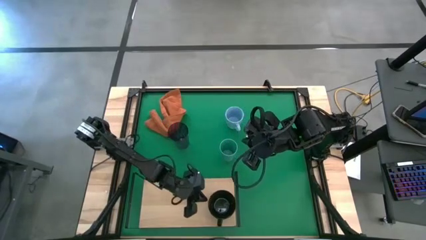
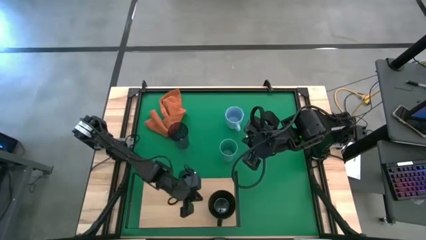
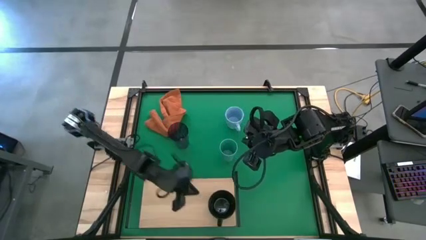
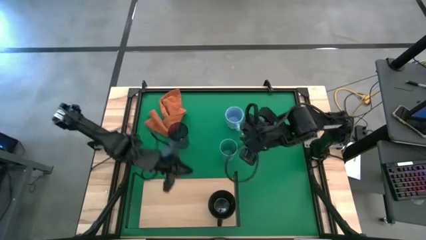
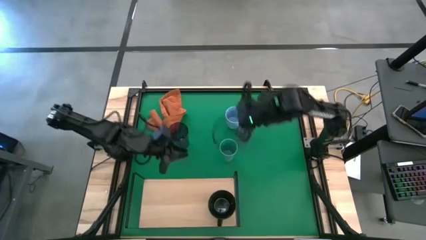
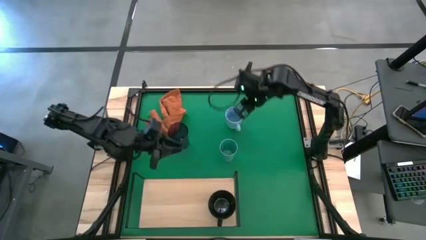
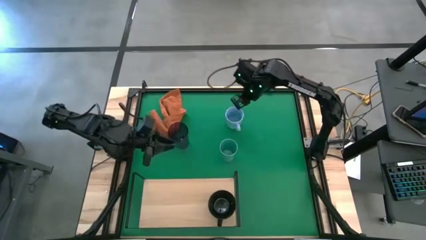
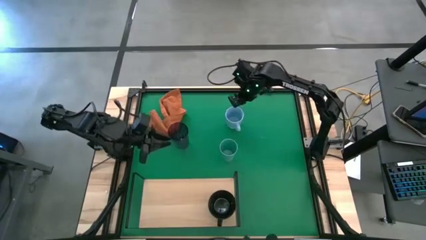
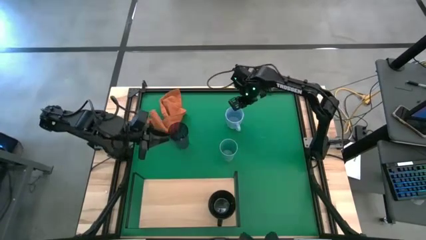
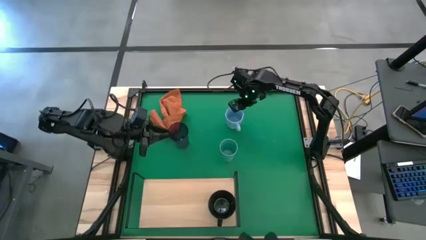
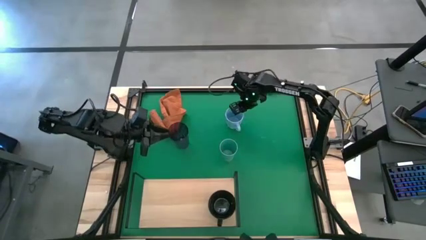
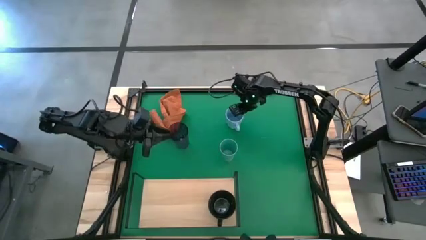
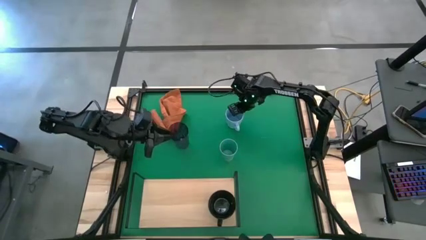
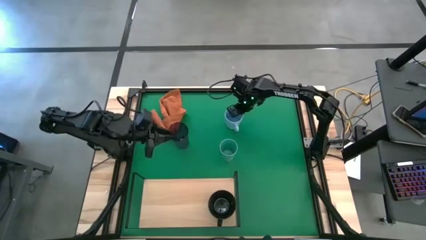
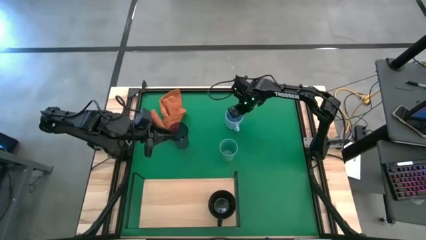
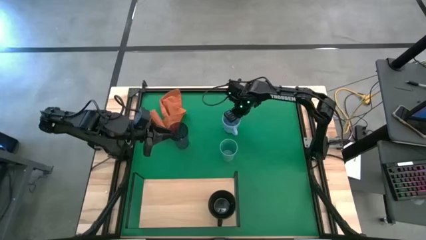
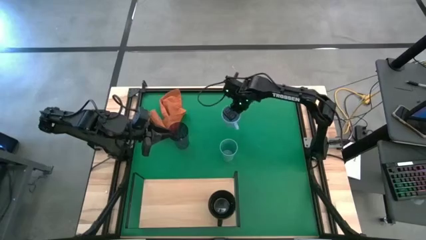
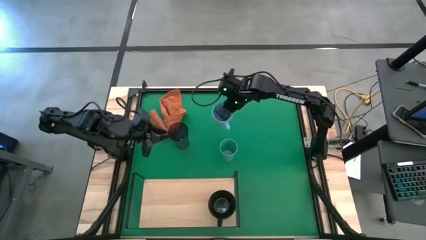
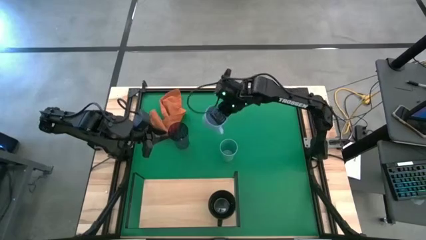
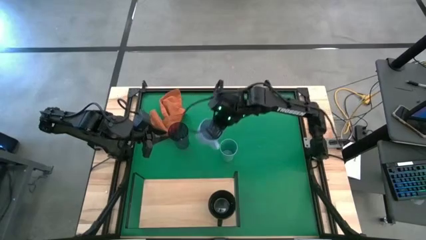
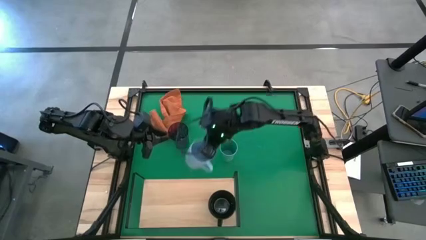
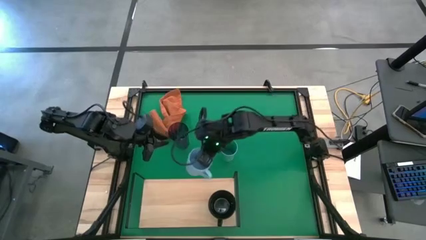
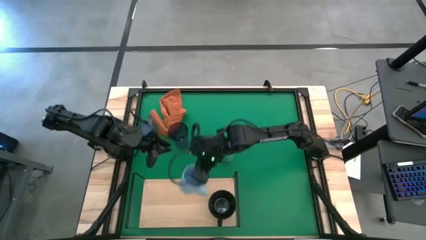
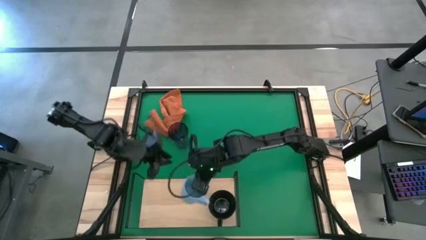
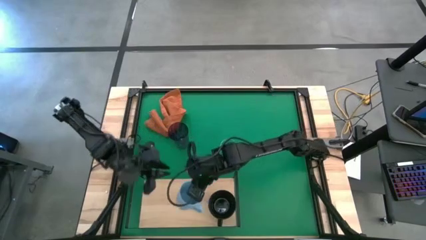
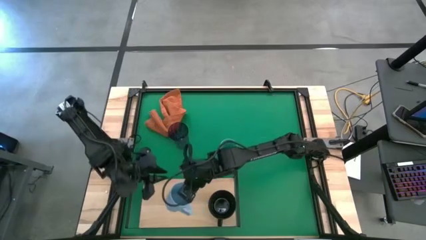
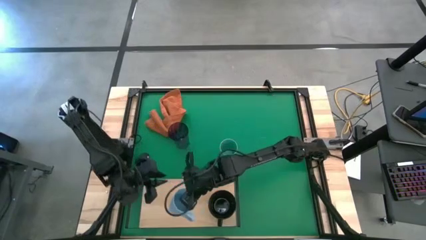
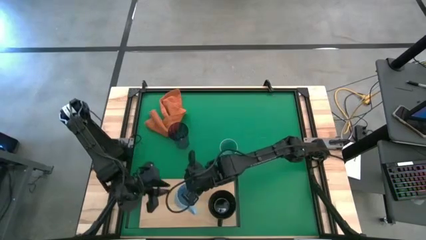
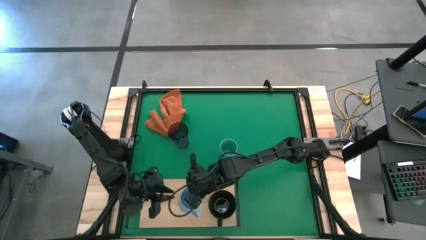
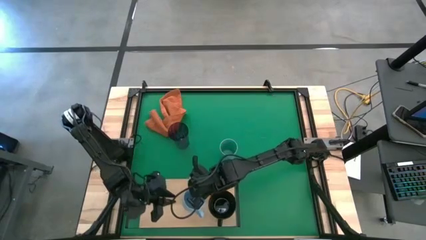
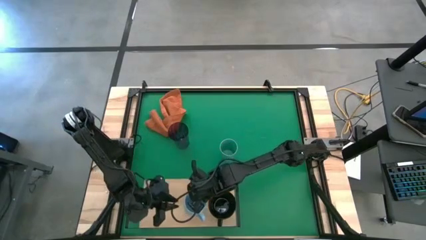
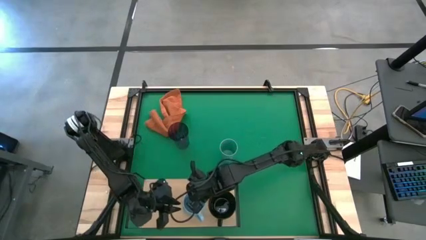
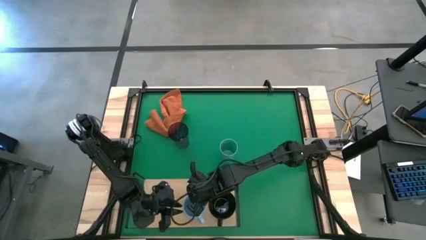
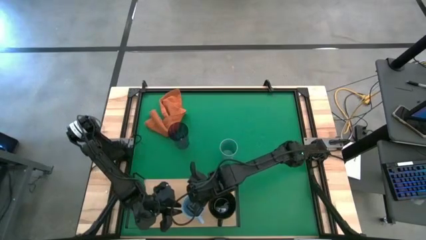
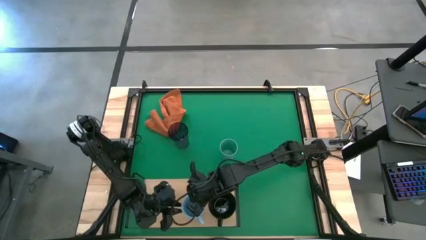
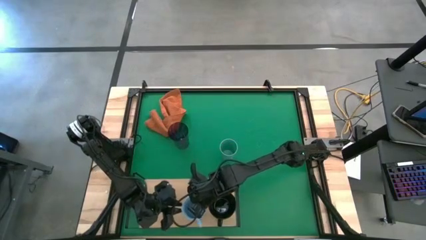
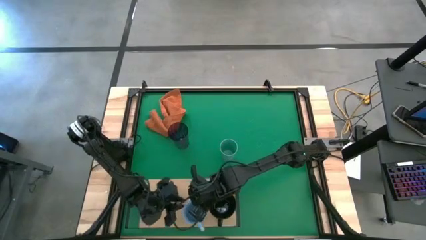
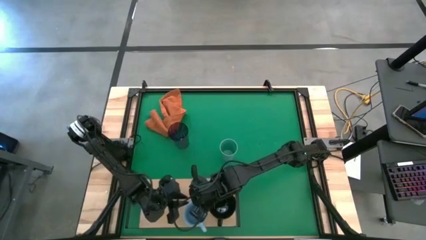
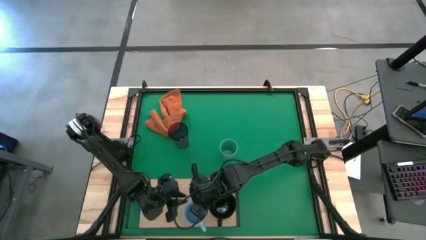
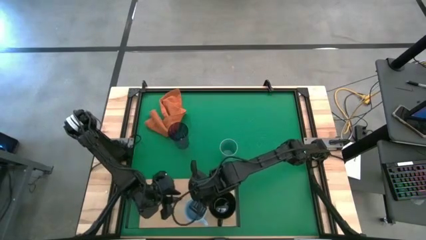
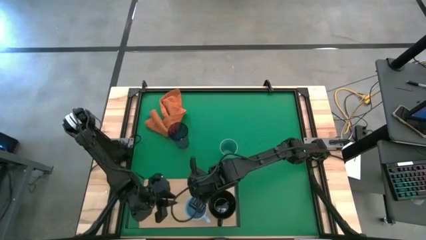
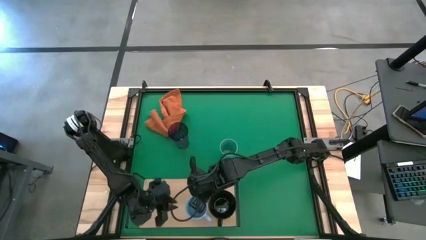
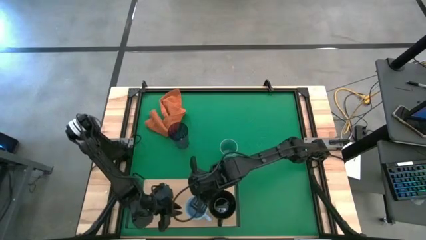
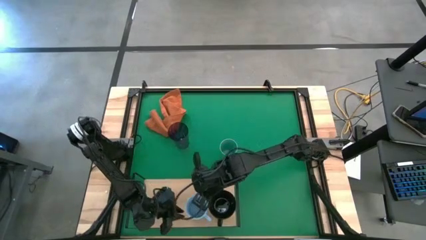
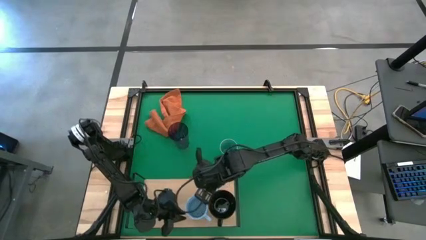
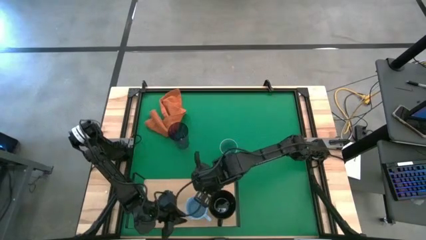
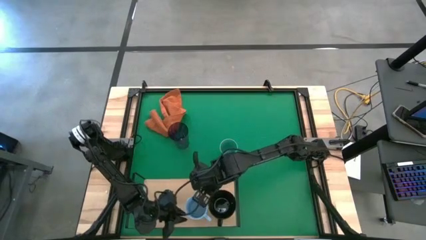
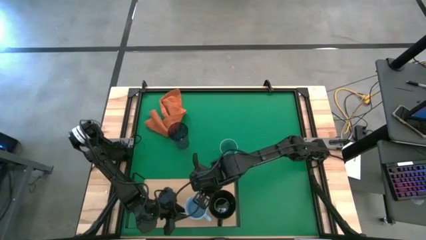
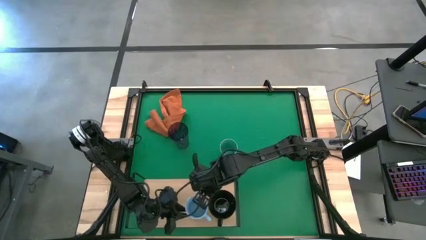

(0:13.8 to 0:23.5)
Task: Stack small to large cups/mugs on shelf
Put the blue mug on the shelf

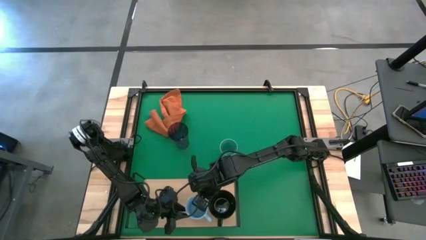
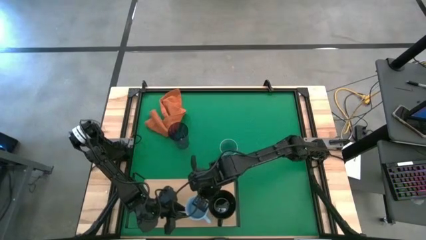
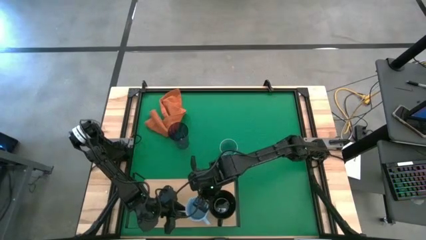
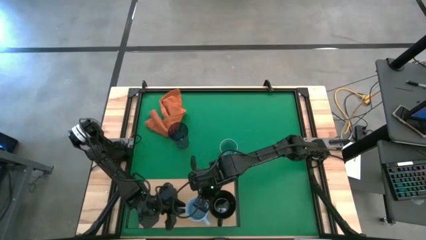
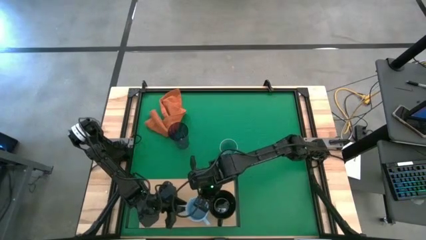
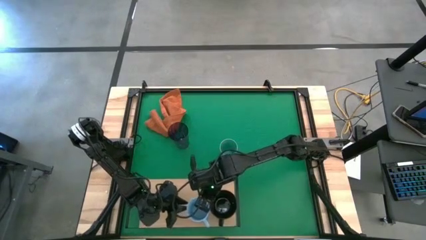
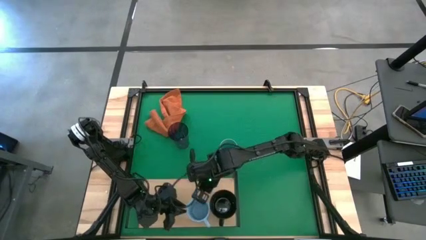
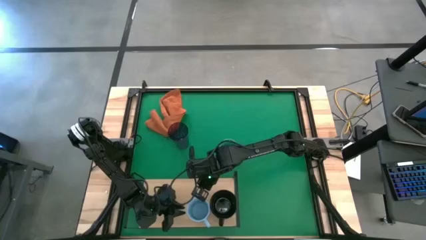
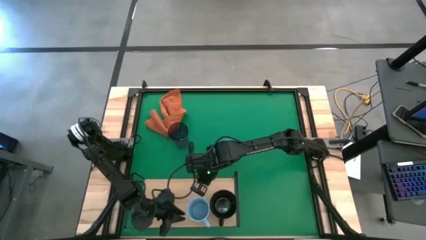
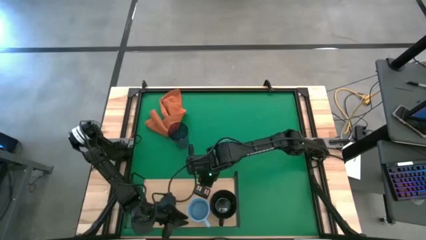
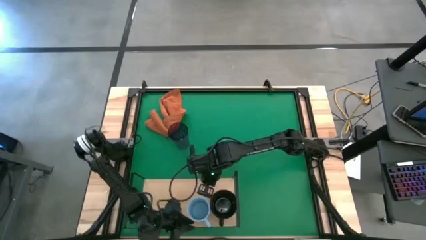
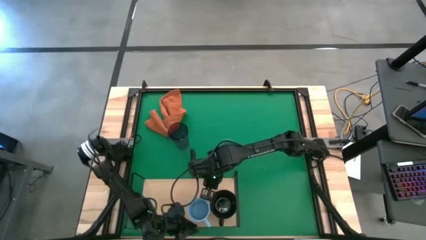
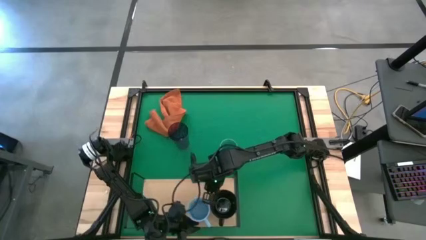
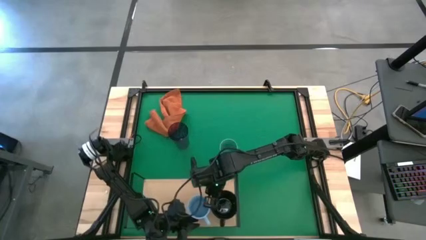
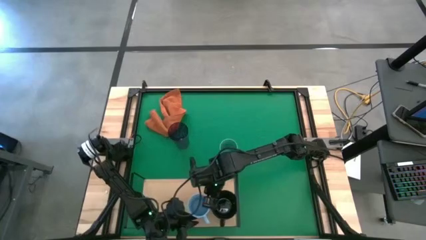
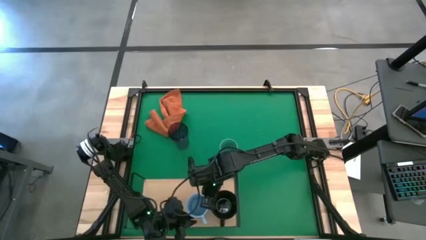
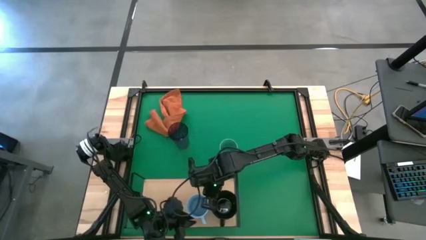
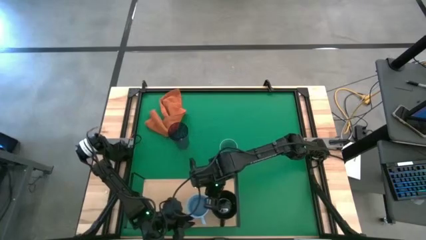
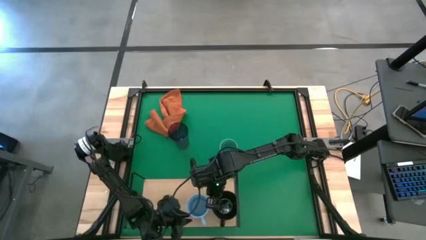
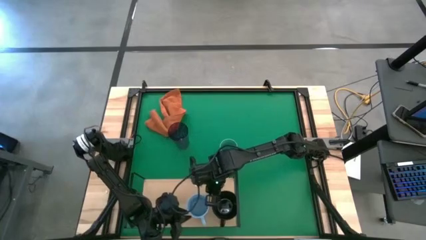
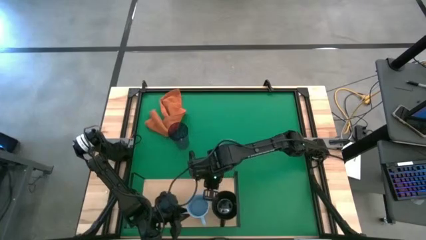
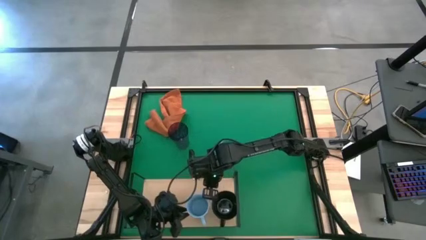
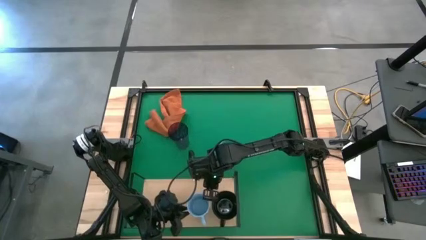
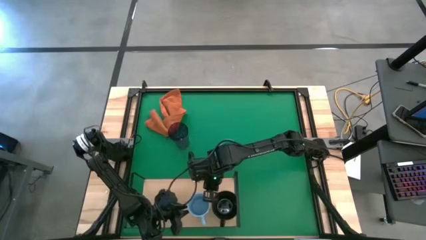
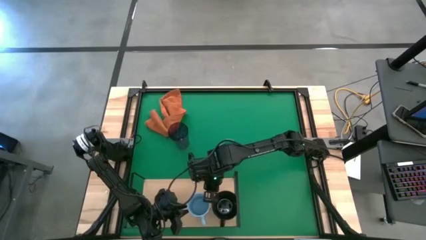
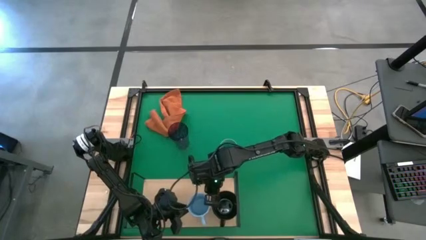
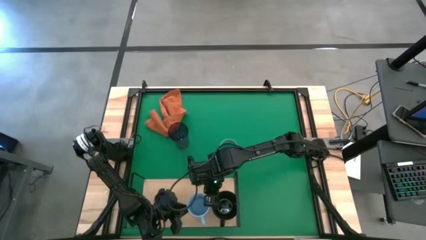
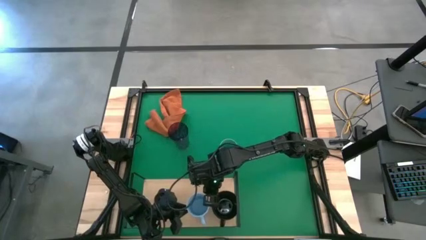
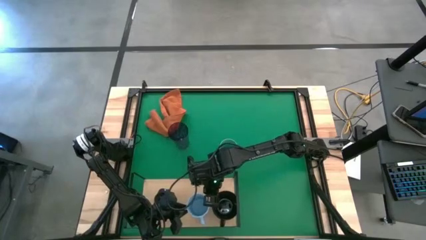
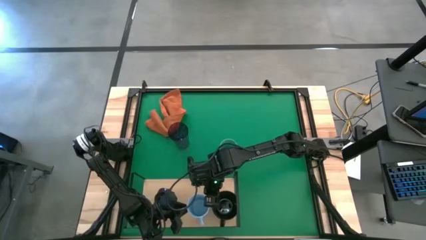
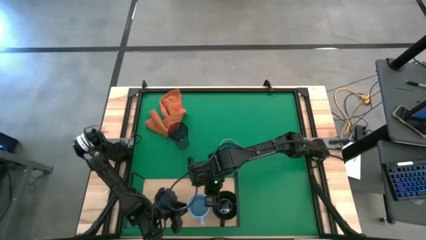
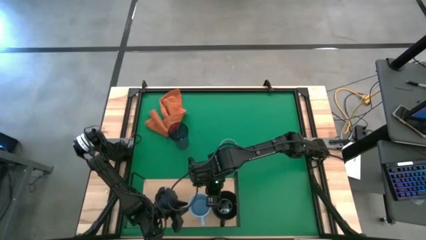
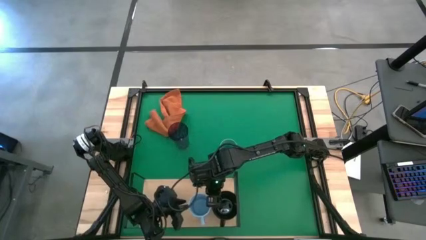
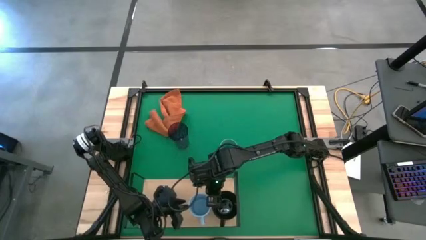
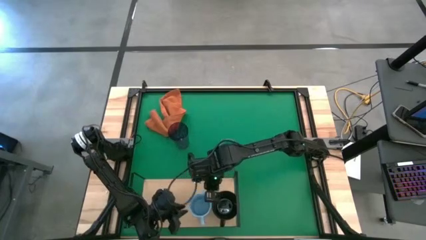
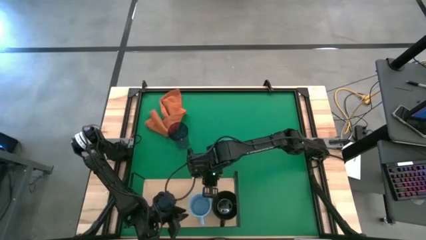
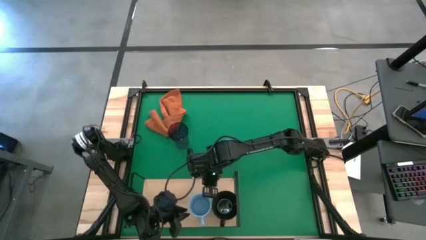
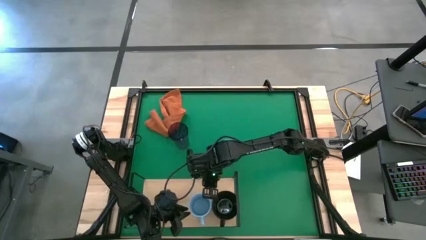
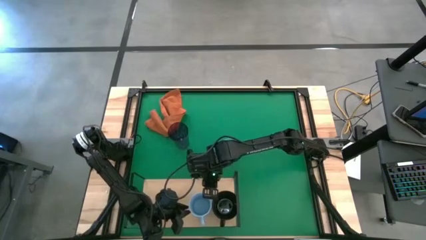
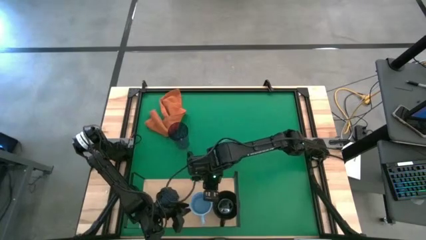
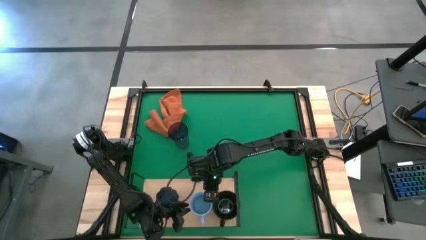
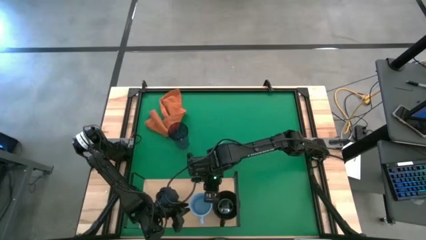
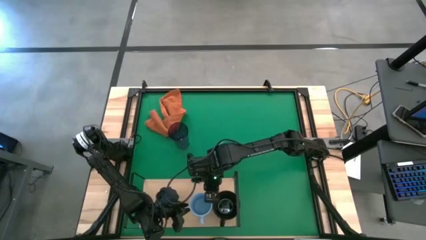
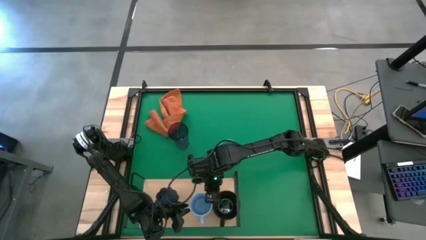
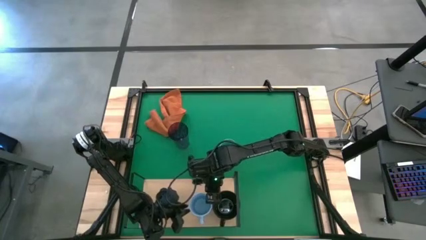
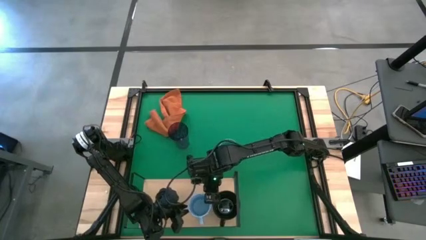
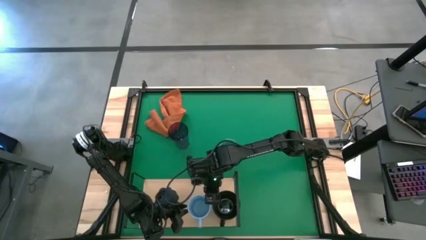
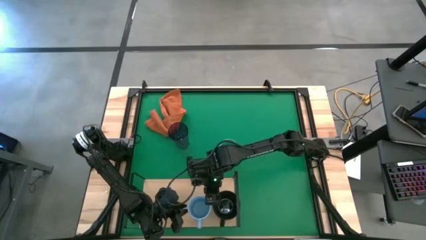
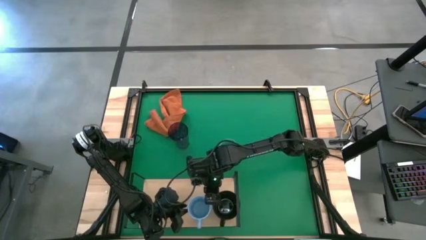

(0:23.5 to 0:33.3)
Put the blue mug on the shelf
